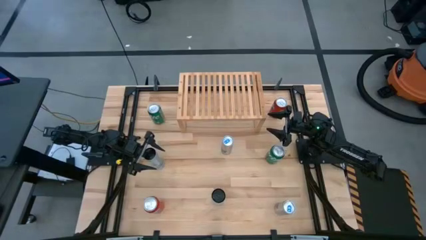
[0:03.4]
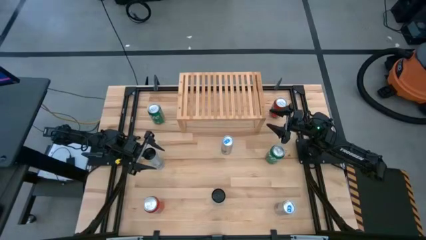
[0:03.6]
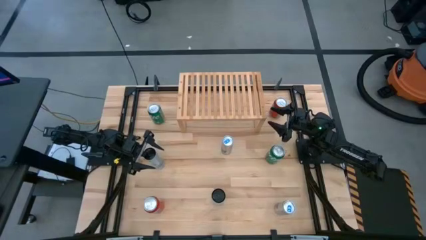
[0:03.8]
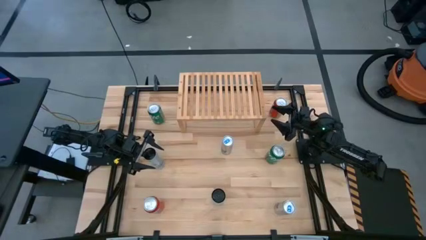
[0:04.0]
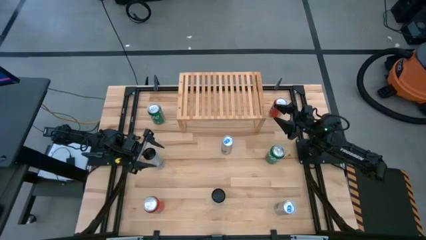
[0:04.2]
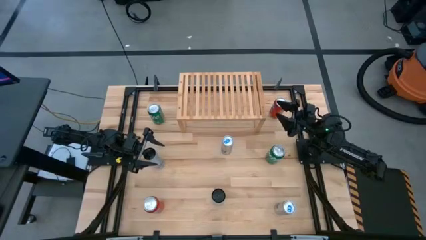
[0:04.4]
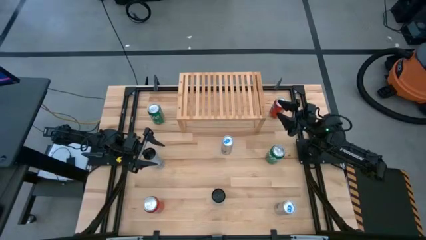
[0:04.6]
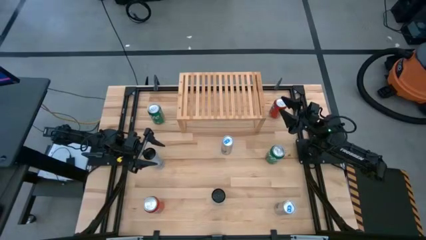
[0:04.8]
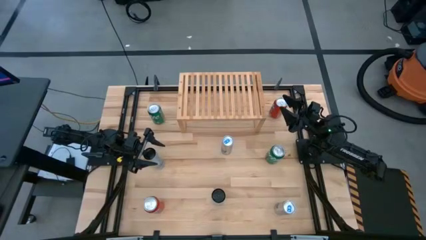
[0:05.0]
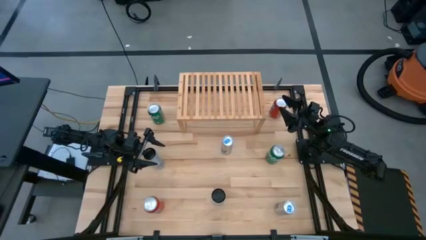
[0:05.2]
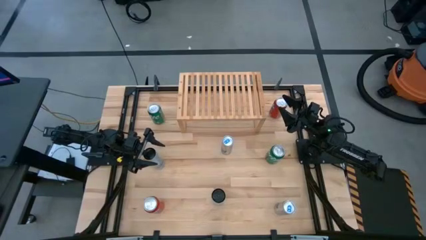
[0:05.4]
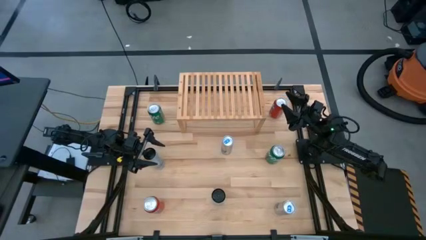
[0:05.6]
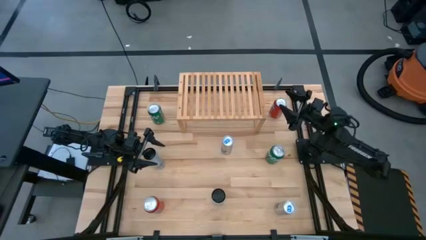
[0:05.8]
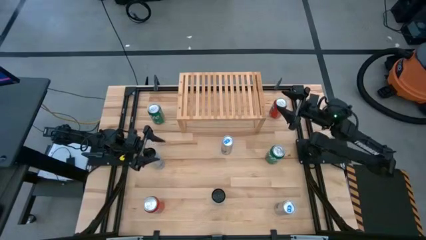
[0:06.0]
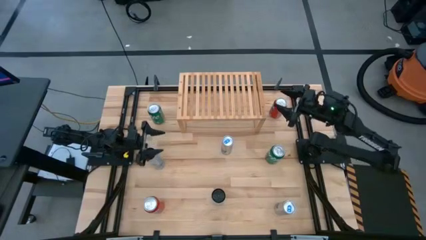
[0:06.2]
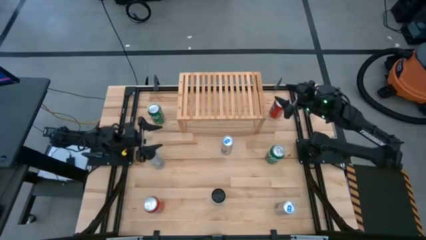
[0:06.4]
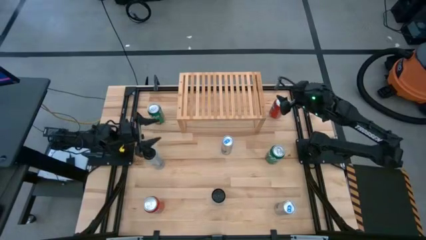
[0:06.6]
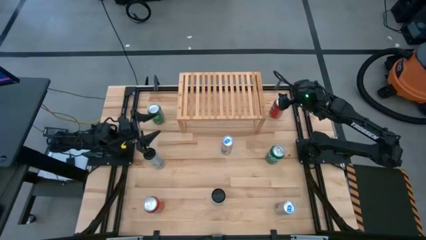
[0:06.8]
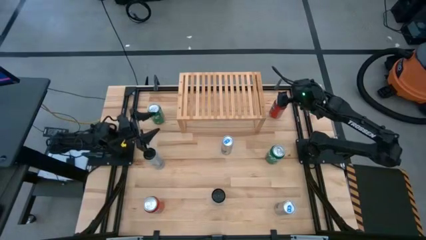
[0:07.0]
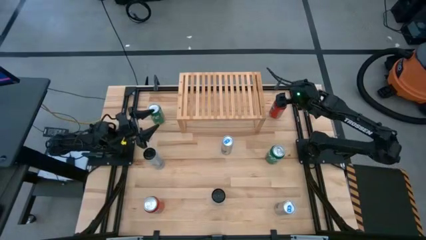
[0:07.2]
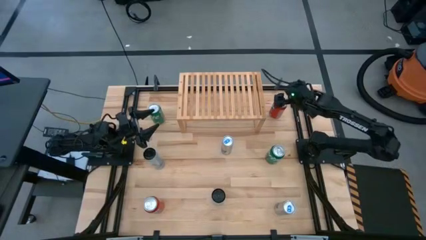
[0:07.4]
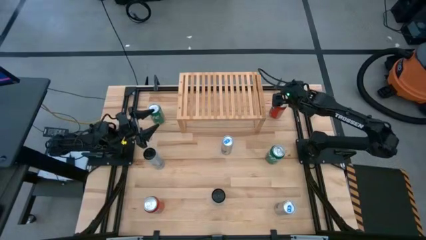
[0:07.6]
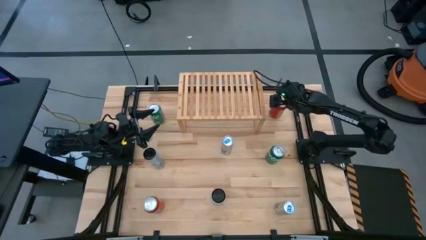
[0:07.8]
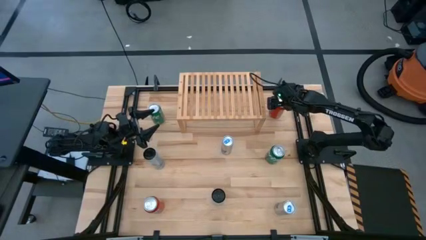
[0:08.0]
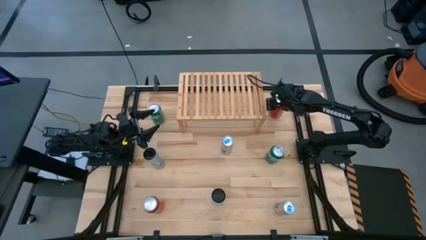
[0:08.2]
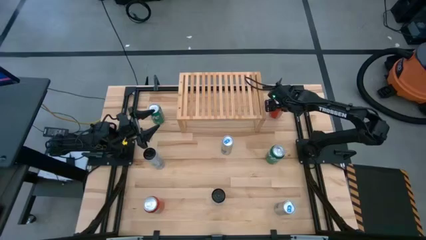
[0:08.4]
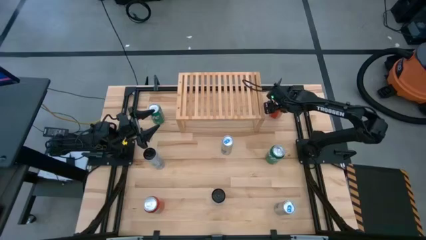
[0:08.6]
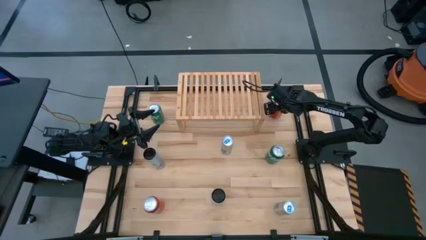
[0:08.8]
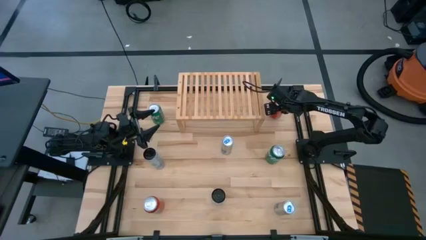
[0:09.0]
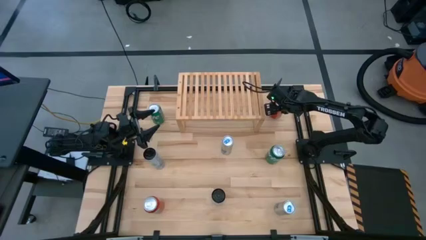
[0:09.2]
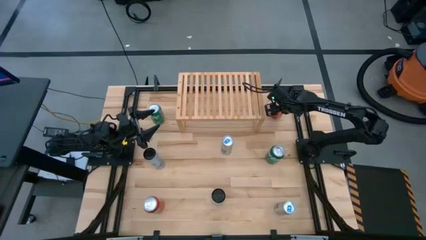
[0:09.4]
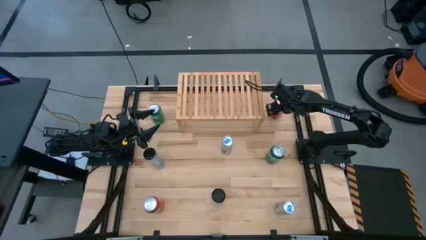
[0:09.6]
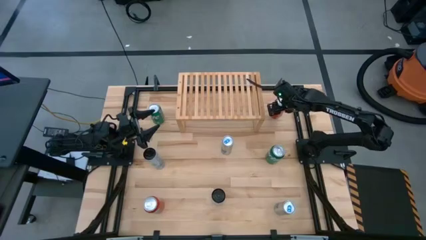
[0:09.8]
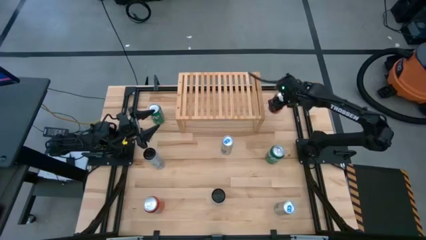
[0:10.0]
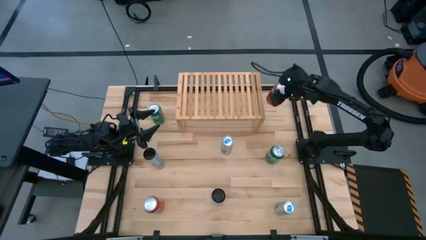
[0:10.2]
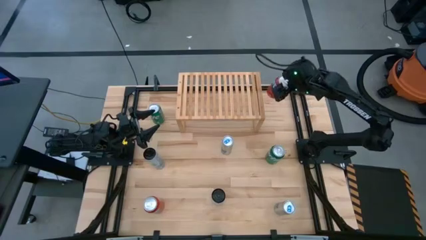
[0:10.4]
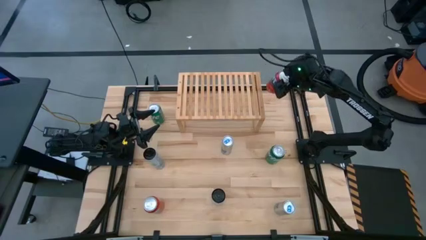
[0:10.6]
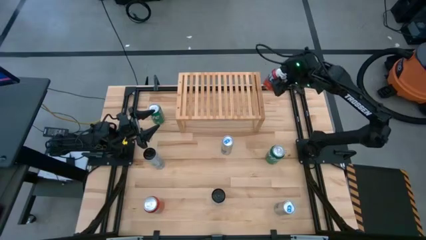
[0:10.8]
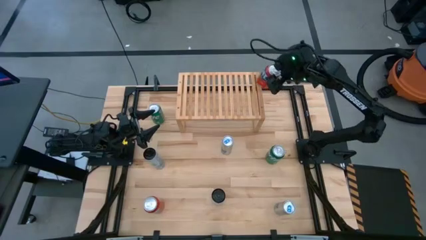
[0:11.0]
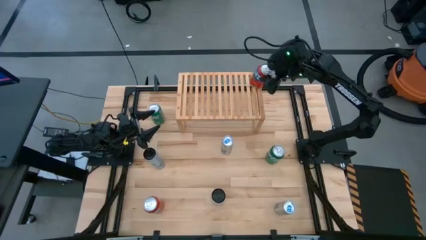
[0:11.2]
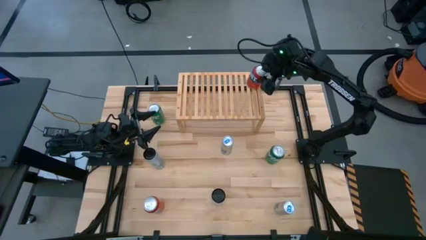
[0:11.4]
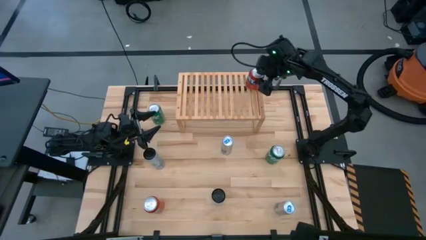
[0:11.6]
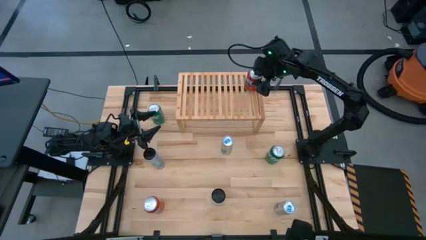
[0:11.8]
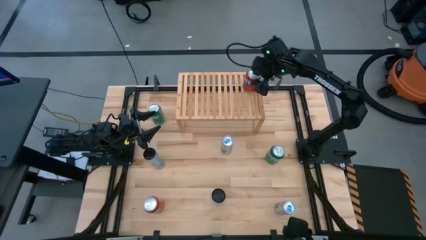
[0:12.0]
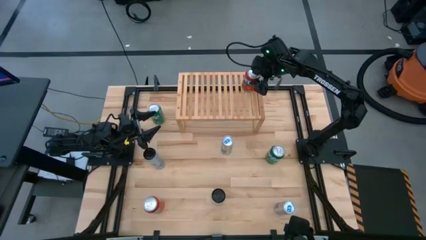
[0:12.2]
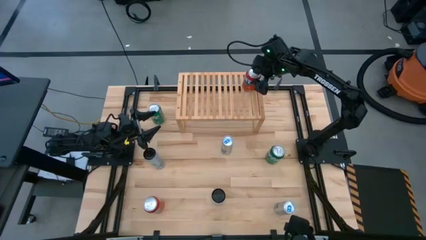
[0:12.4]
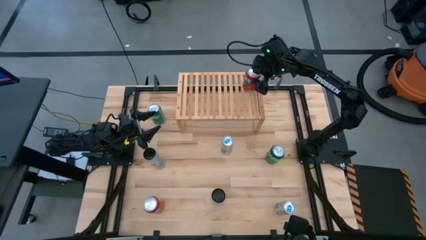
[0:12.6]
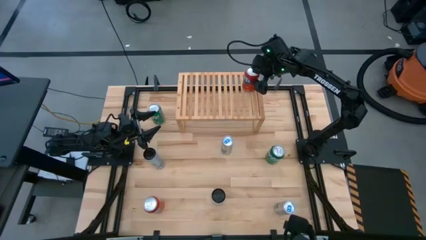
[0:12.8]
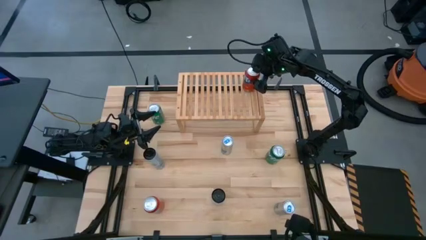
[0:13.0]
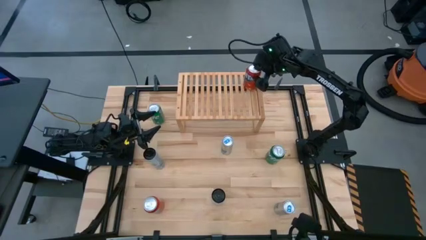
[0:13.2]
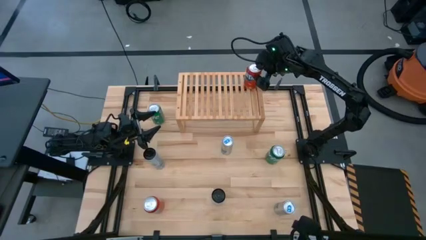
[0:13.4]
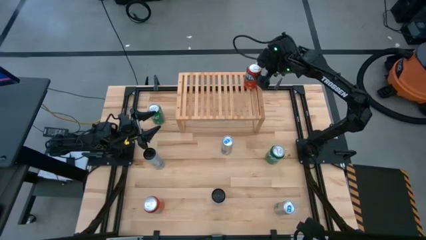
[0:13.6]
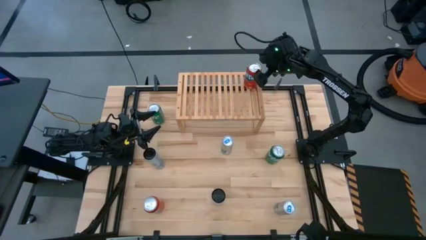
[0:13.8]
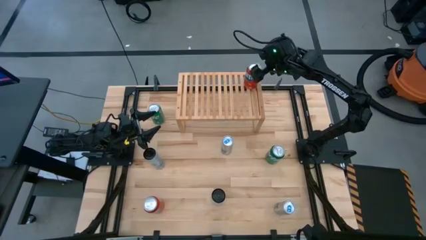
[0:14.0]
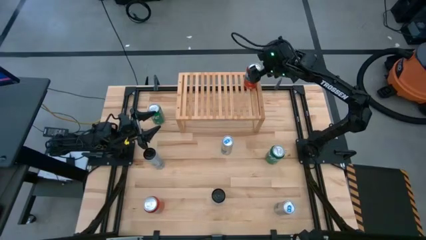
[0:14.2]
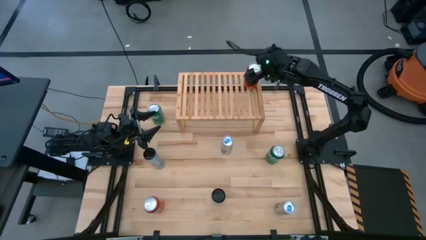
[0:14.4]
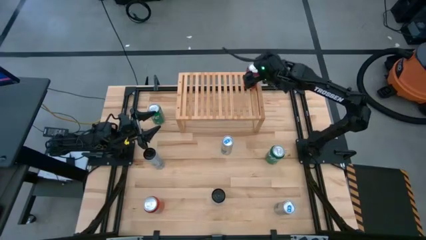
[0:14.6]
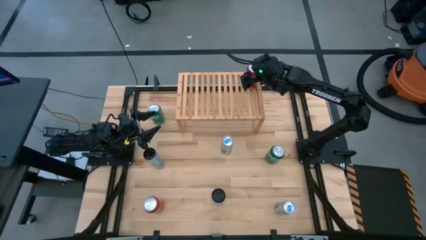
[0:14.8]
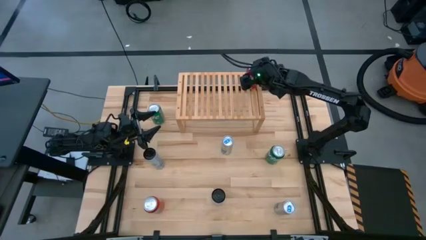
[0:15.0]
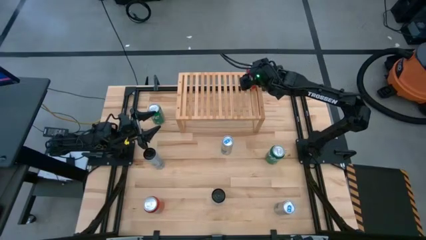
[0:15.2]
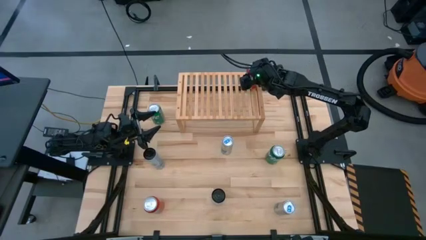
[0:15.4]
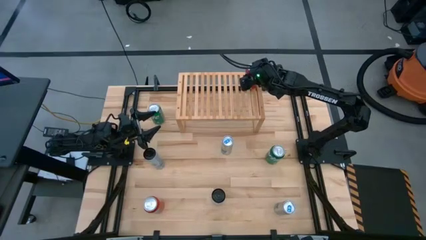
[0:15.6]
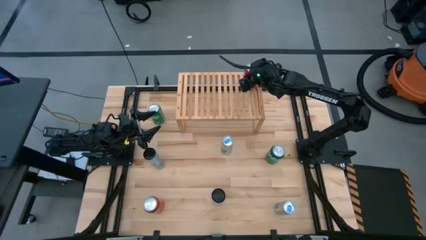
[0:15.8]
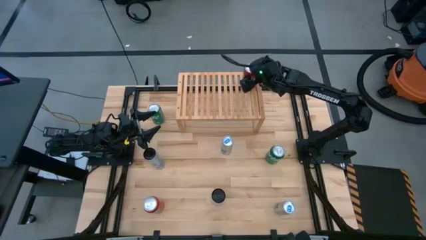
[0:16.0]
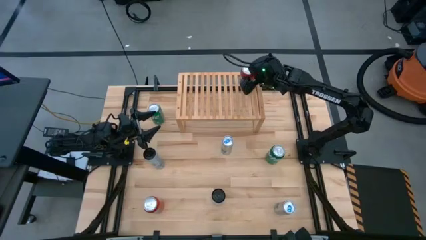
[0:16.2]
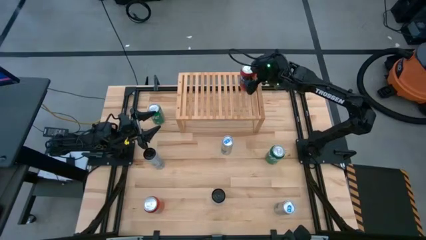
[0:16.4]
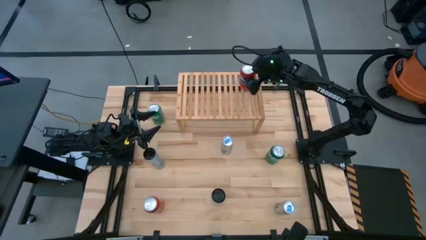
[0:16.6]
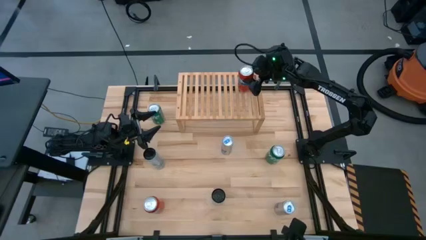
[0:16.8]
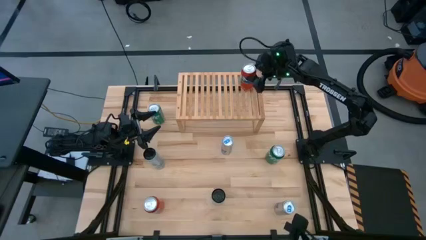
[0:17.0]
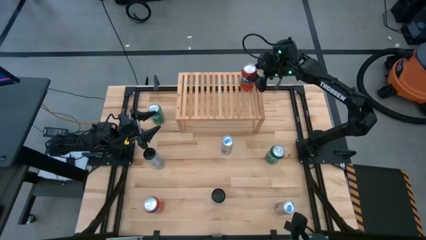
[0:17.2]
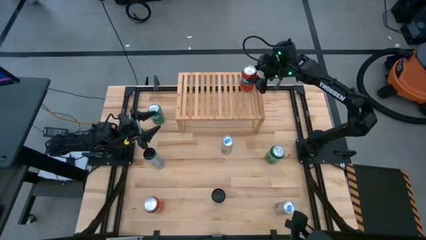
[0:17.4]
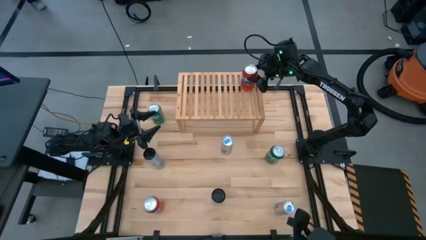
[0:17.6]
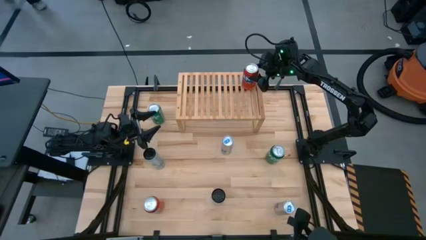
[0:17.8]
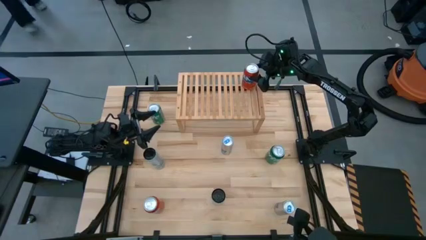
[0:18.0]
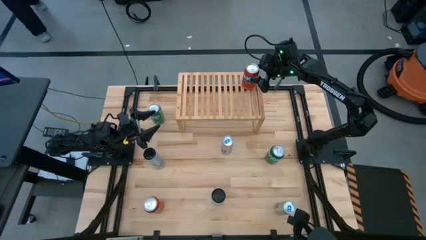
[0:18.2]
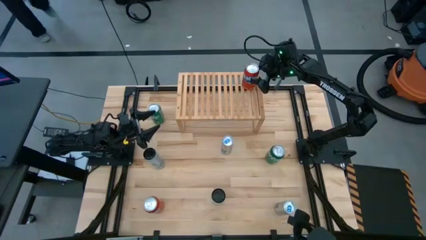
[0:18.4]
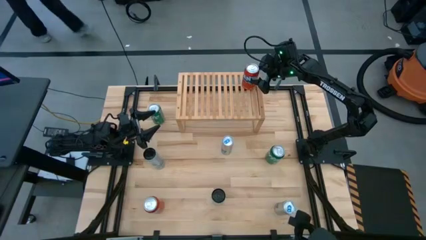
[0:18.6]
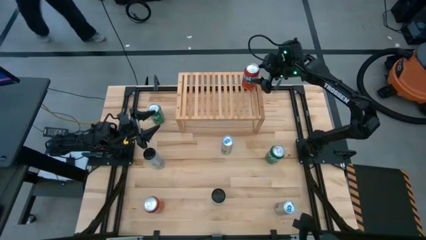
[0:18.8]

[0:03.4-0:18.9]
Task: Place canned beverage on shelf
Put the top red soda can on the shelf
